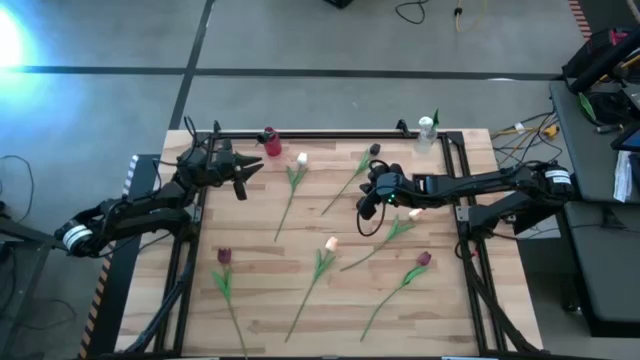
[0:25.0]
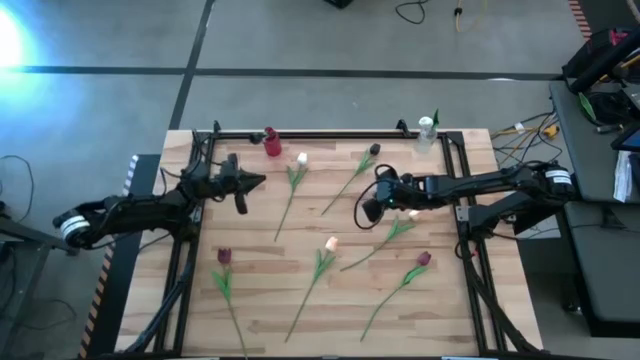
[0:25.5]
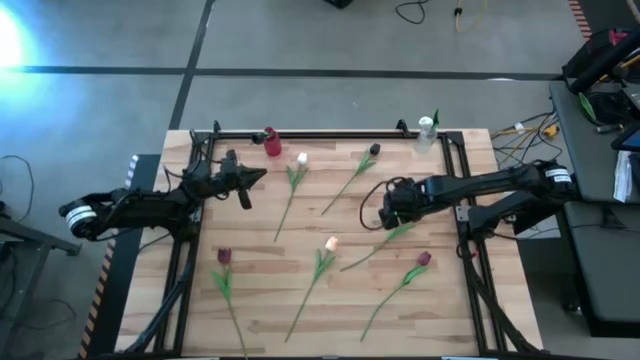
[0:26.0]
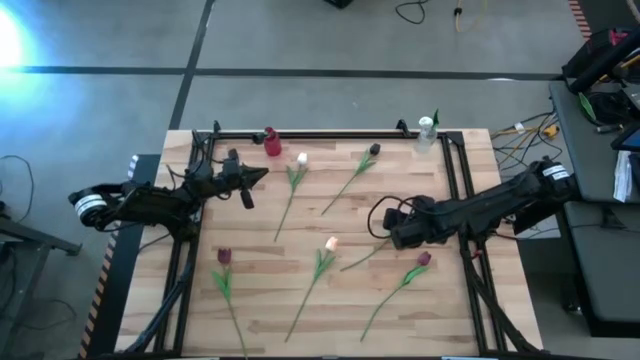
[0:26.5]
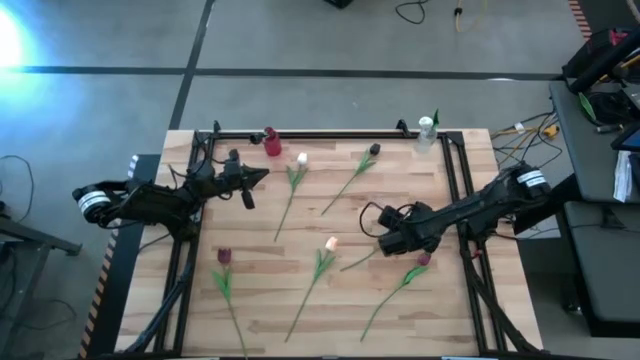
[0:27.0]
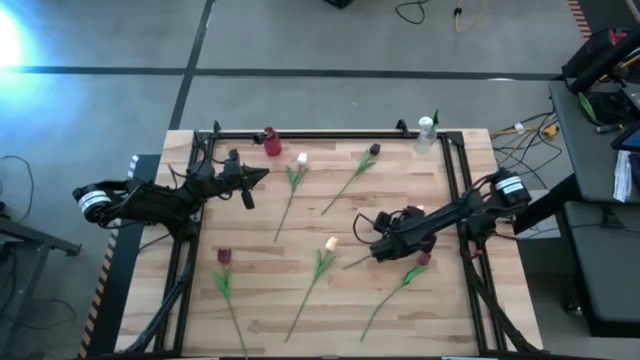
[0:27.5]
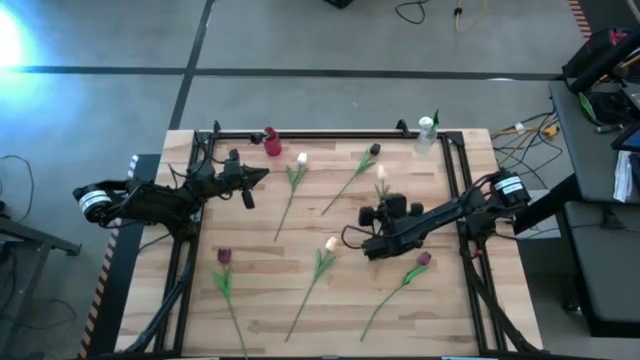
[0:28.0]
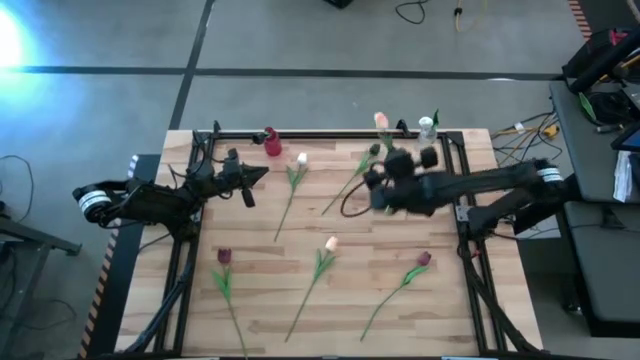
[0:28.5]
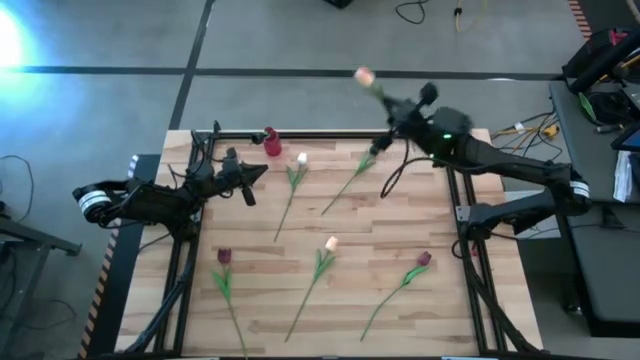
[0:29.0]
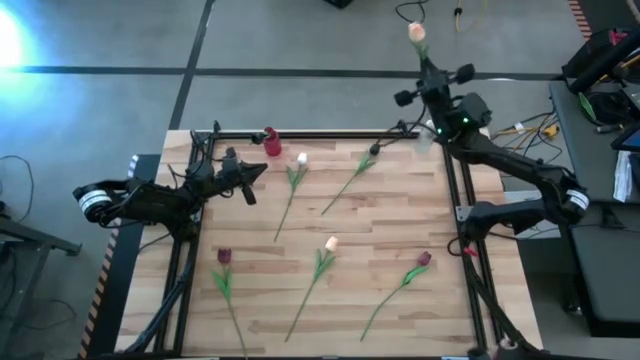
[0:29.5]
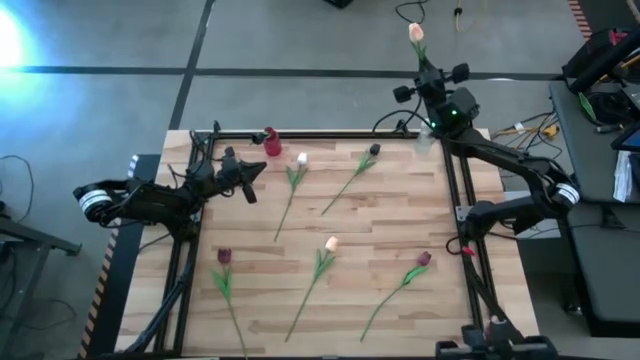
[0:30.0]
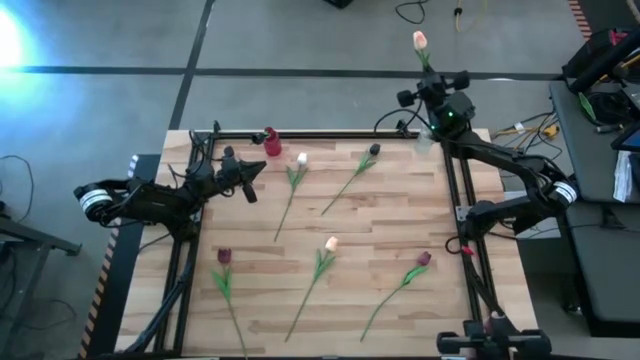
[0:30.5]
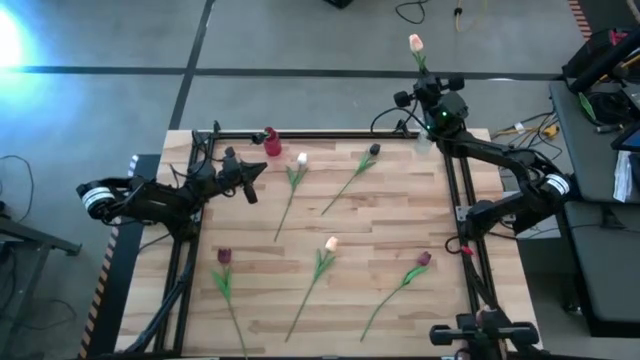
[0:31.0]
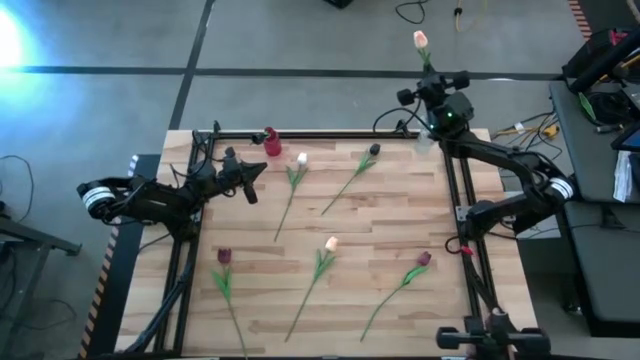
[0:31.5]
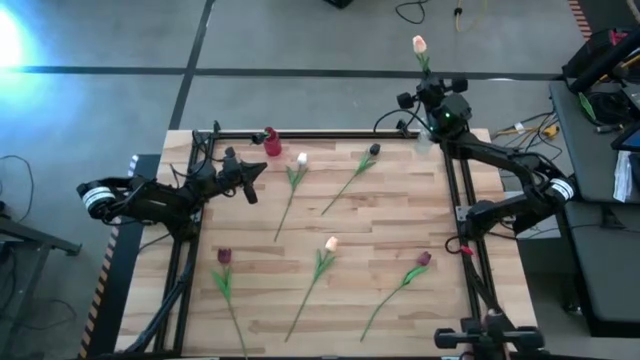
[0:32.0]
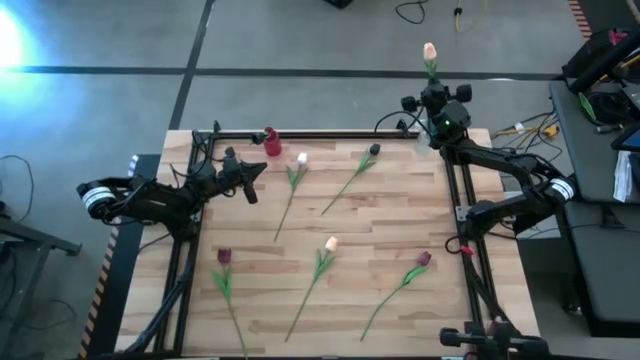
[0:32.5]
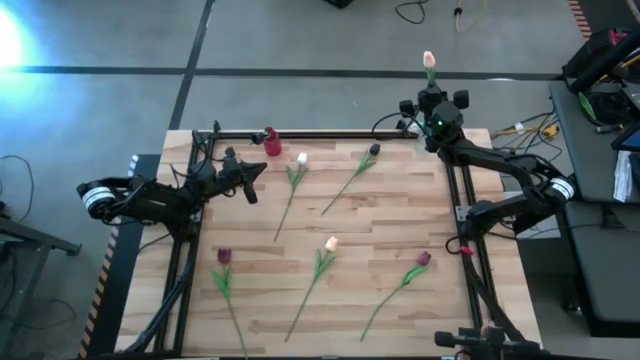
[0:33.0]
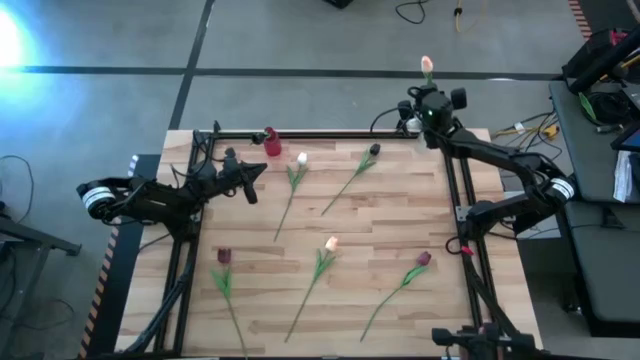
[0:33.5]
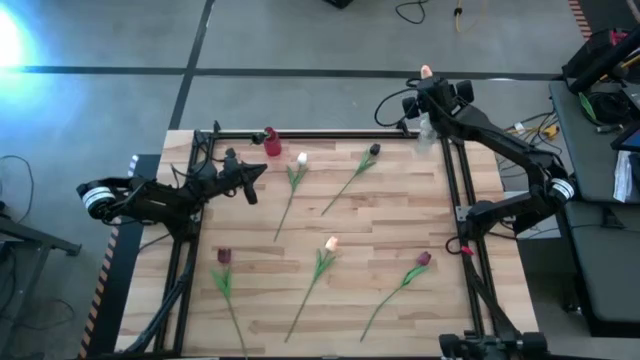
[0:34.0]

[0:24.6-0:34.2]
Task: Sort flowers into vase by color
Put the right orange tulip into the transparent vase

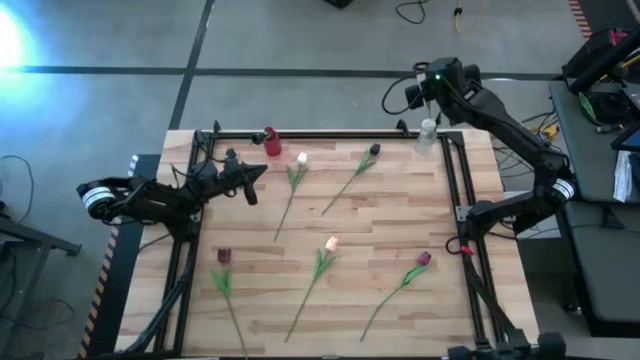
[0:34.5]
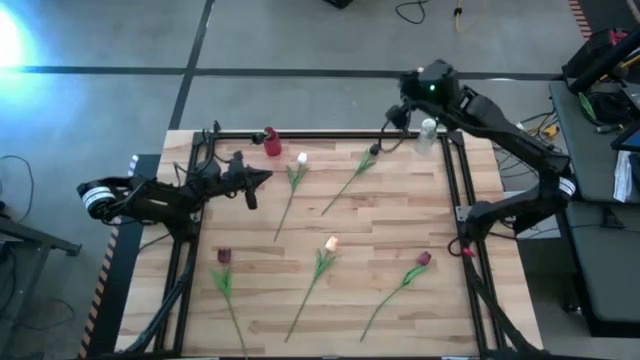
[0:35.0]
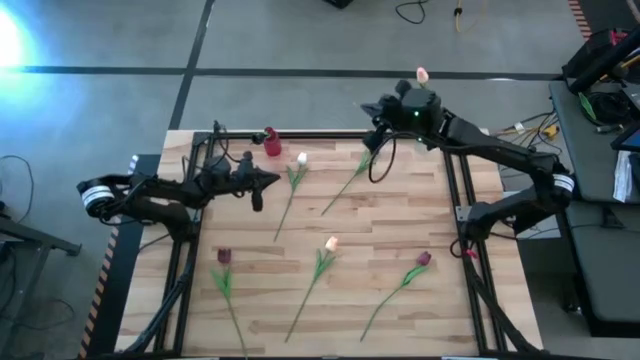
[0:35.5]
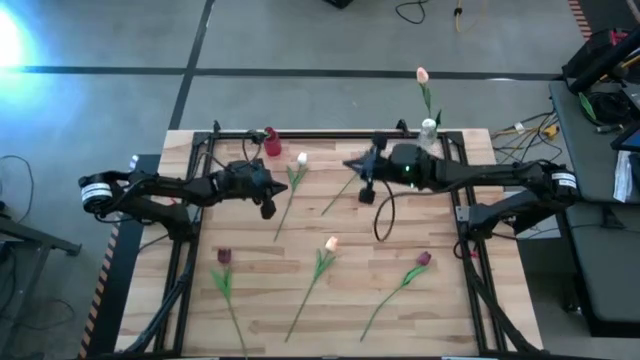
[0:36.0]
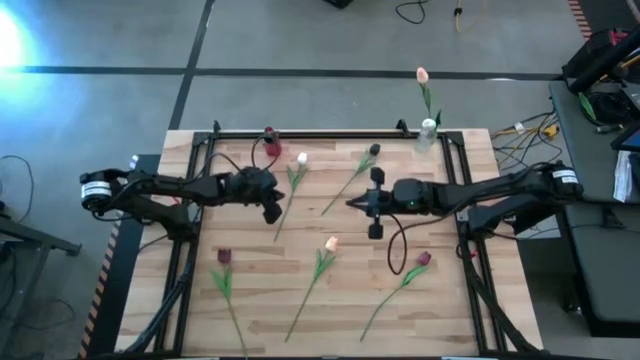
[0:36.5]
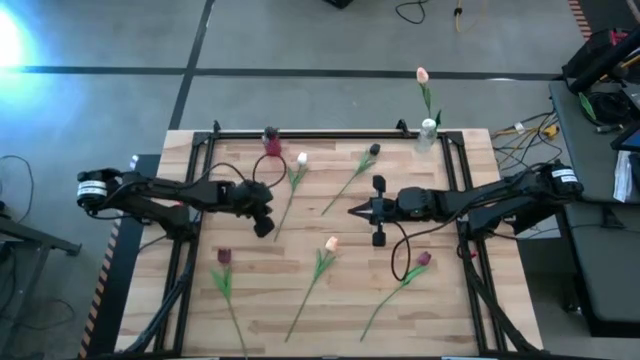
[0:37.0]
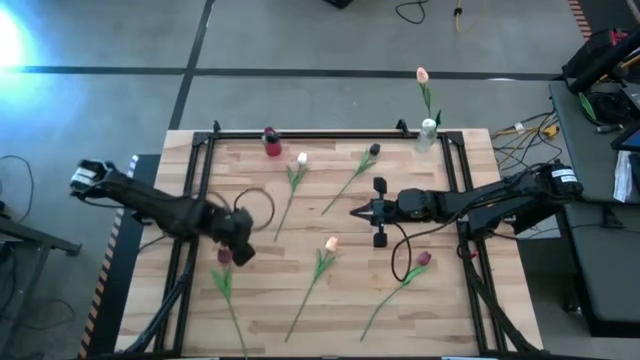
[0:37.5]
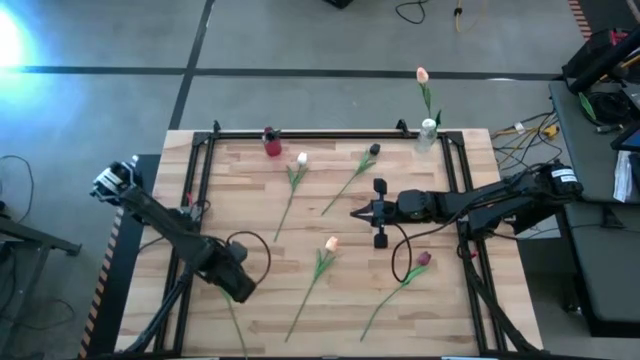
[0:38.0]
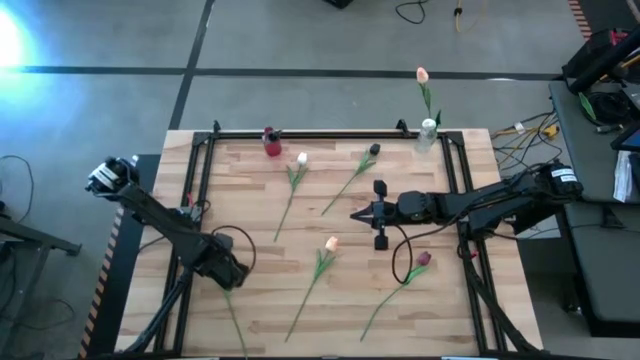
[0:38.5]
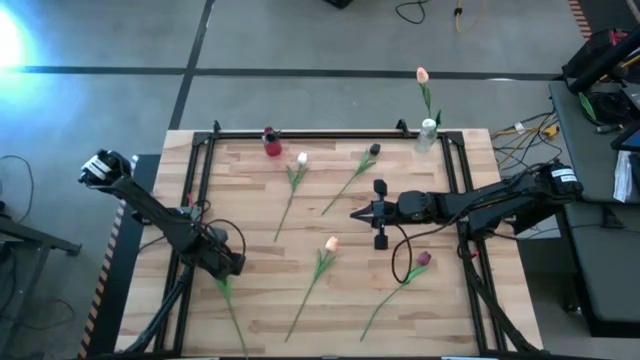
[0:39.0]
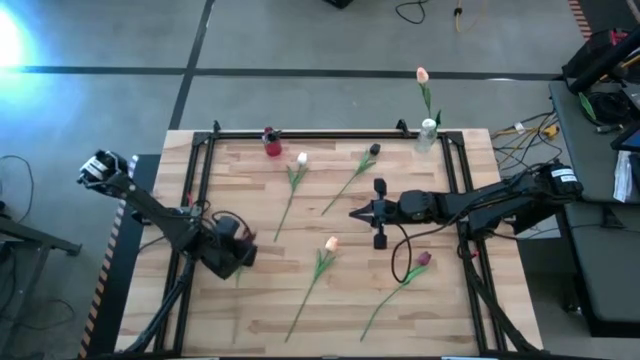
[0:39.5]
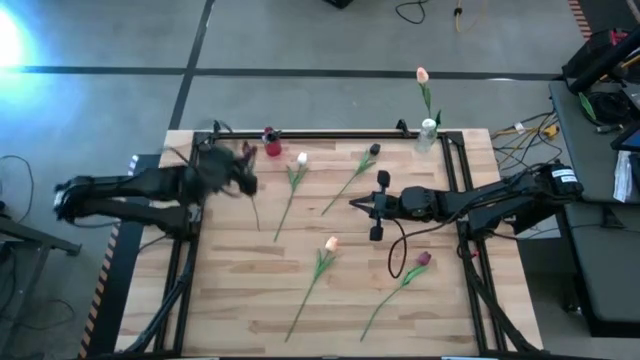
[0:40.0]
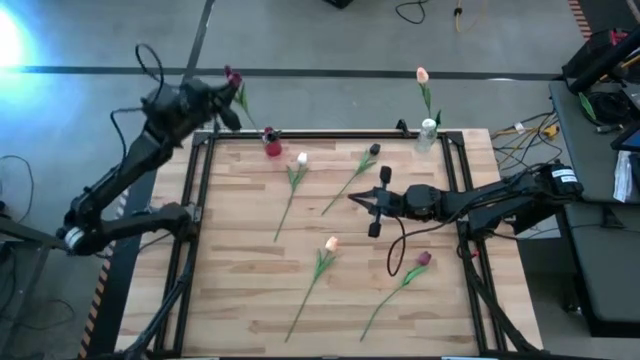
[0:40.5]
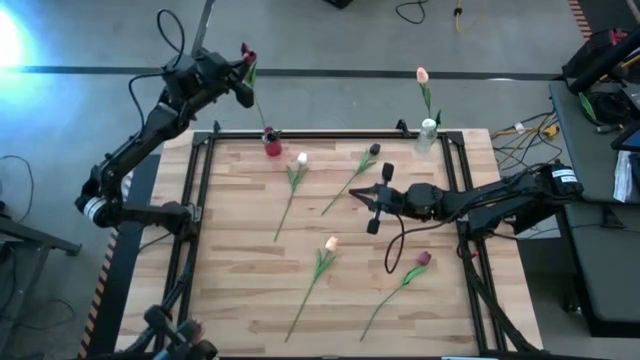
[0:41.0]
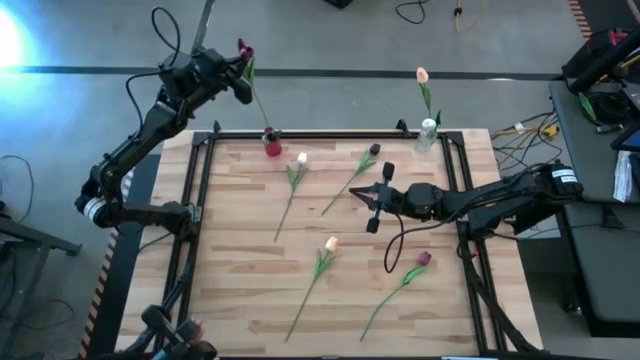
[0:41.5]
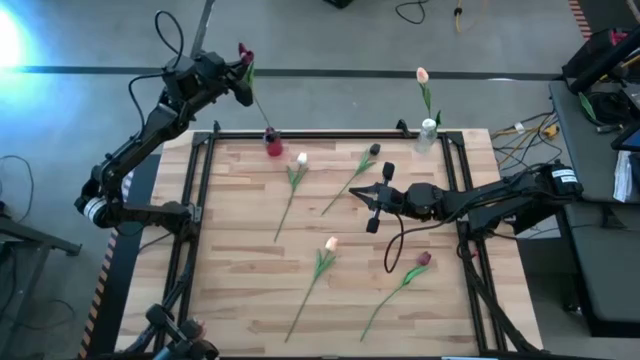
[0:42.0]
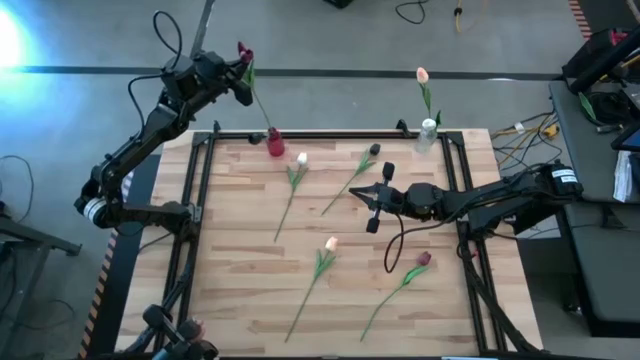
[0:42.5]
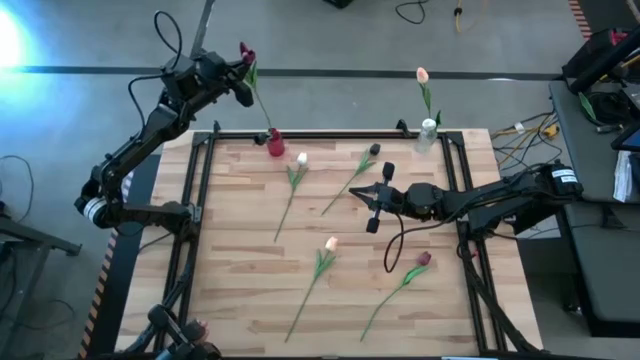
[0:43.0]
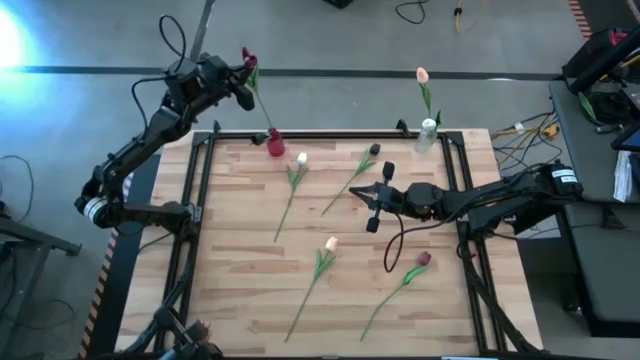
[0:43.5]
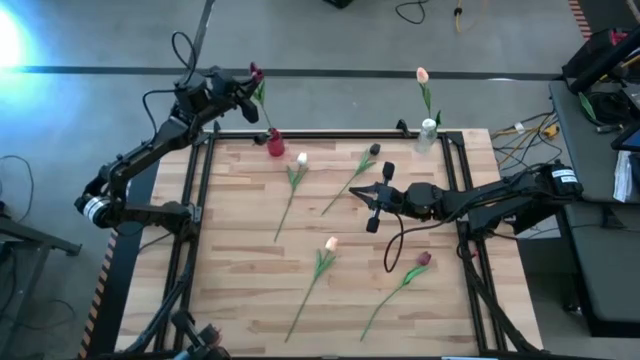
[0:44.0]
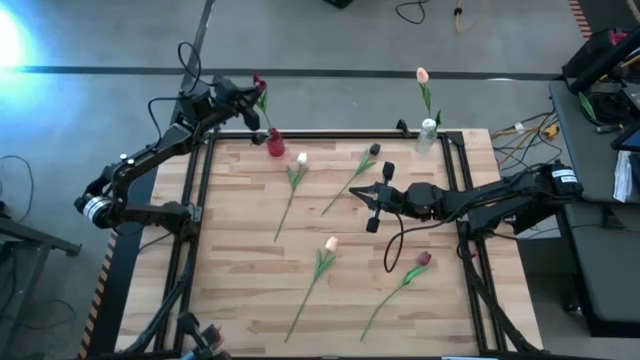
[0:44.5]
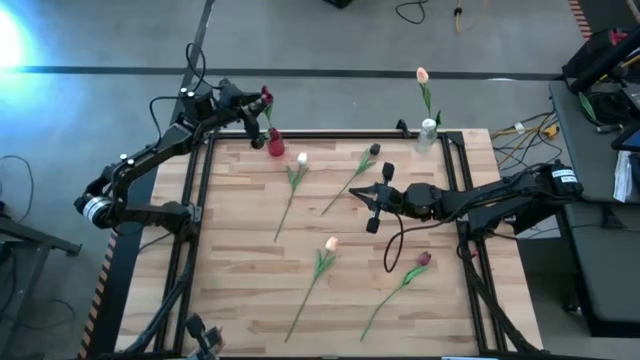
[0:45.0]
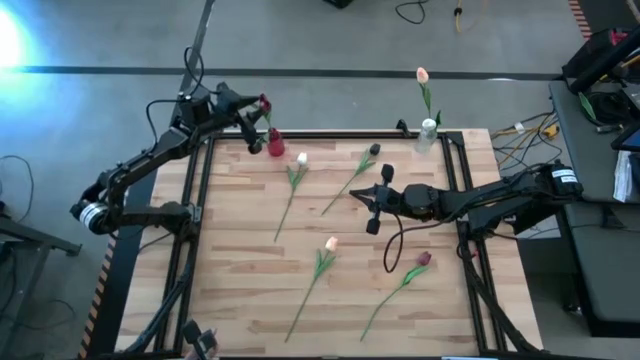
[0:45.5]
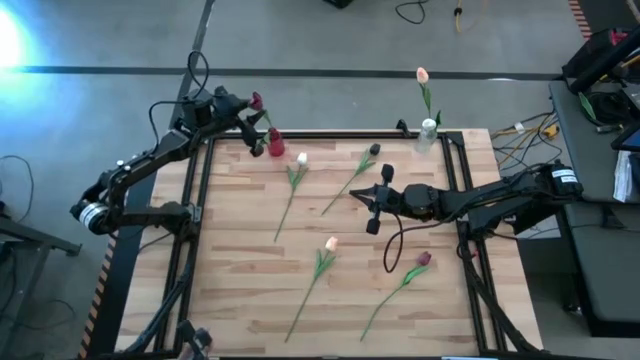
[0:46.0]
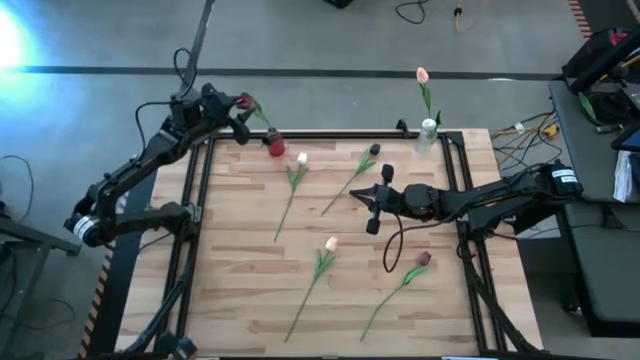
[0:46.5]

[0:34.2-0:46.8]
Put the left red flower into the red vase
